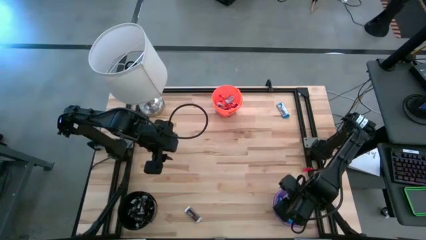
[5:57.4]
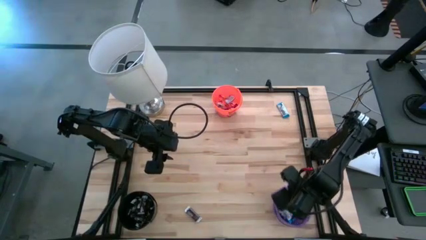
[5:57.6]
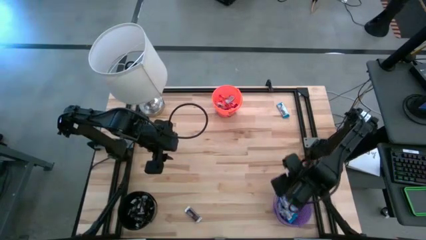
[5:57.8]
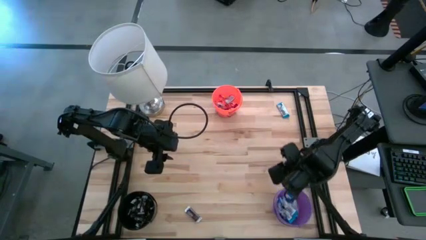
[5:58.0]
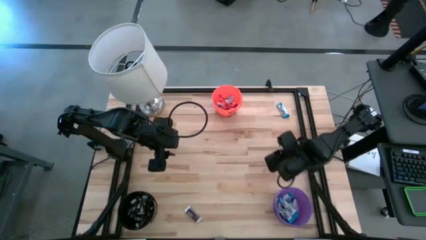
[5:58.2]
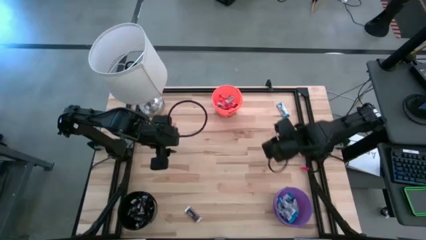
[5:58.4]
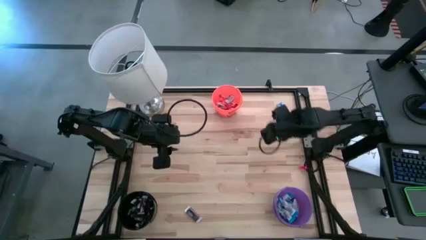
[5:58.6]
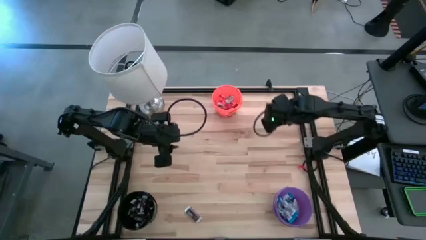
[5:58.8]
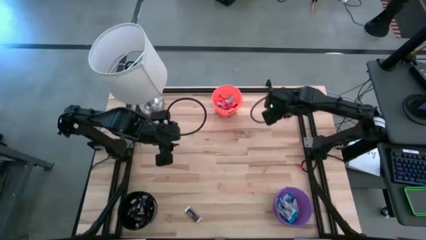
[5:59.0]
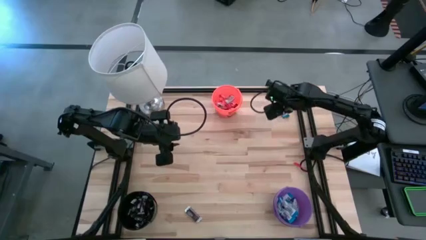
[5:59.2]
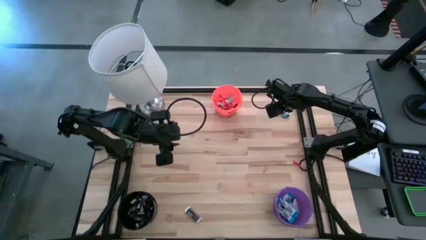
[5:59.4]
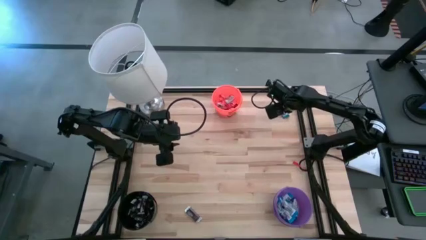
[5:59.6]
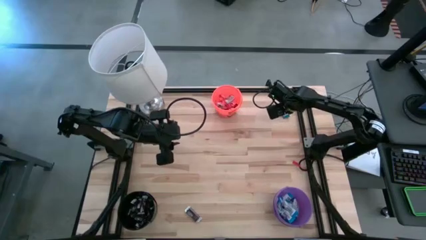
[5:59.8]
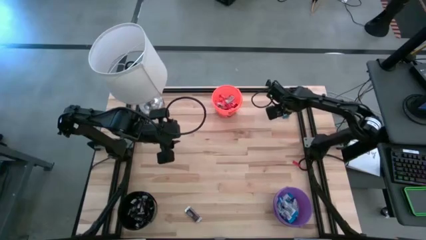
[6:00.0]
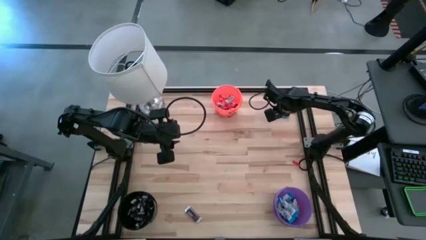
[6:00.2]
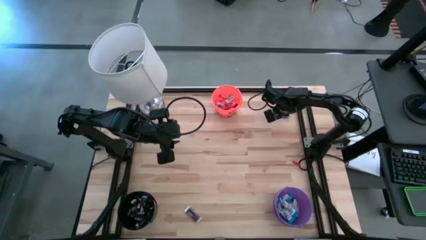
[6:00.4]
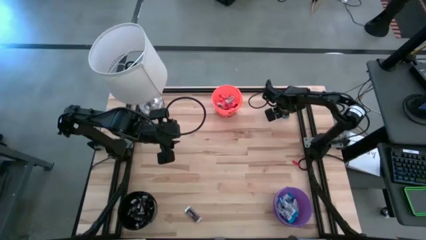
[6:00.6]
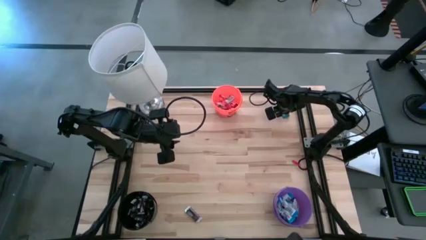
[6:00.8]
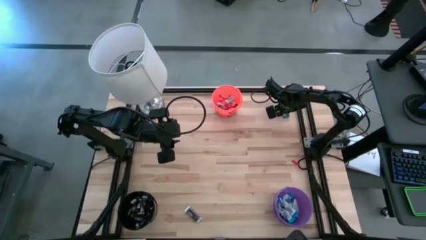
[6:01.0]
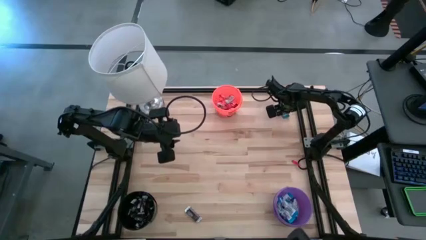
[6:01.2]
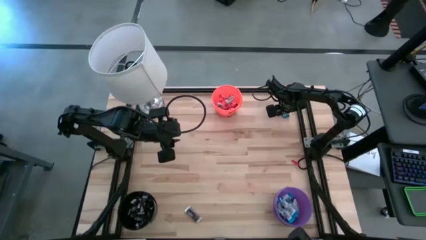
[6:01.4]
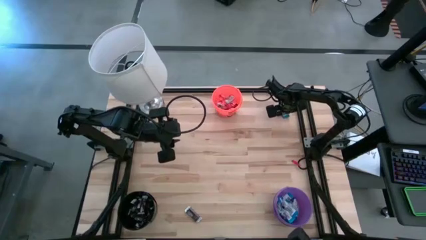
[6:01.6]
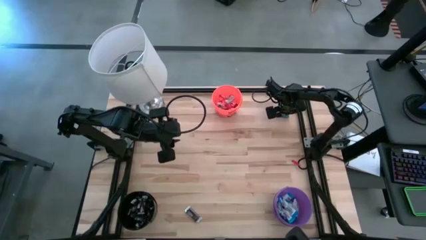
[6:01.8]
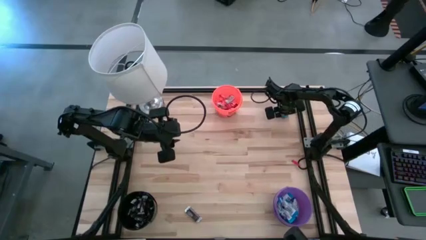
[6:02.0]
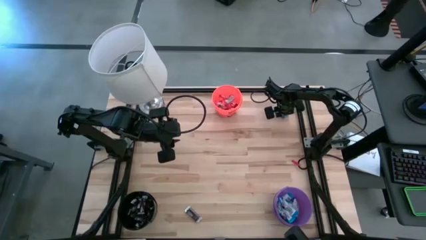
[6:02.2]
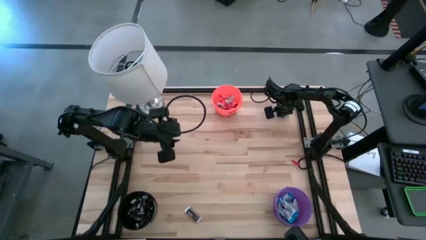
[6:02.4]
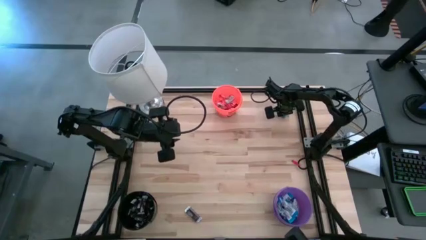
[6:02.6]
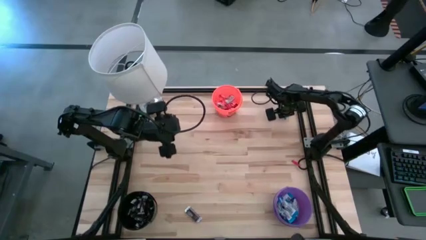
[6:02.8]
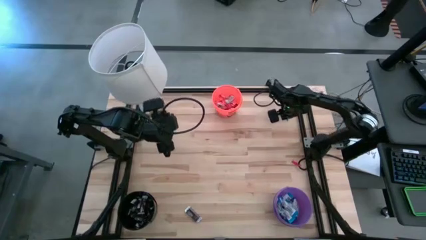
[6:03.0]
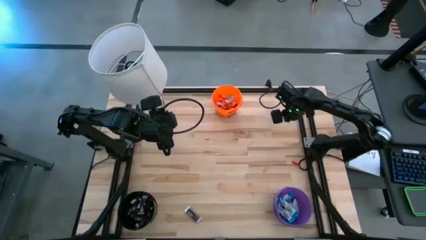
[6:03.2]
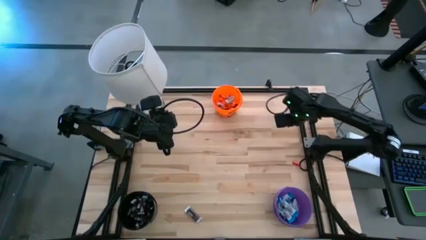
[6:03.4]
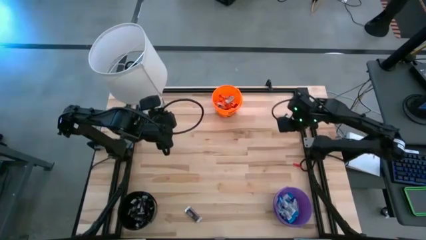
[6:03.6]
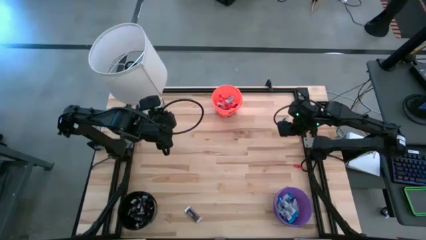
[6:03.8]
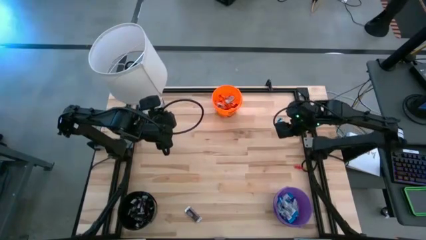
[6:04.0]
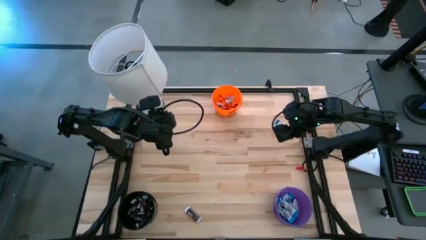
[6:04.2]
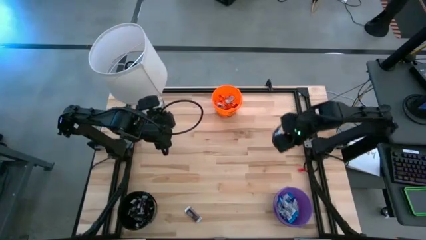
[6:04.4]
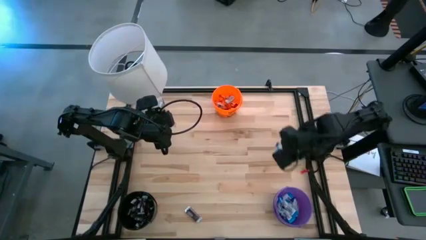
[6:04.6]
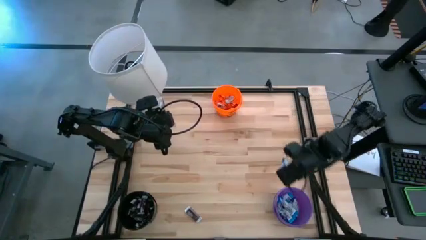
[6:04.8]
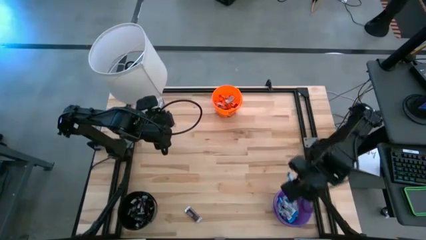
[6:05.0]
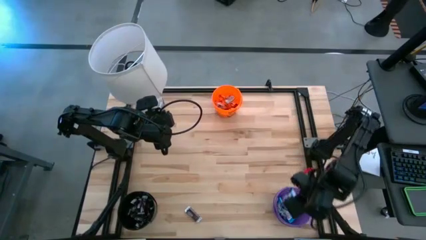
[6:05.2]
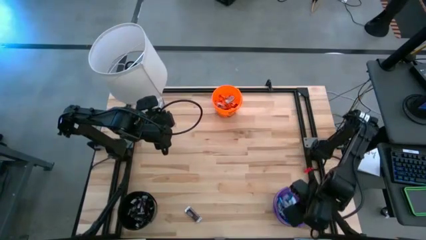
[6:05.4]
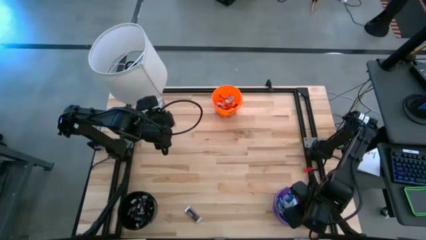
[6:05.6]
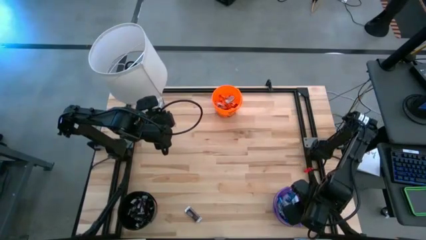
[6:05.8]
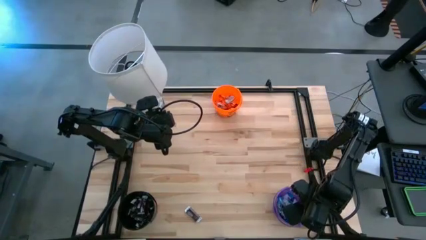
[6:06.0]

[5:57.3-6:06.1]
Task: Organize candy in baskets
Put the white chocolate into the purple bucket

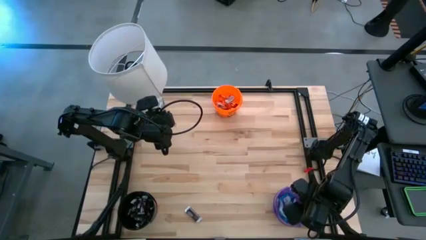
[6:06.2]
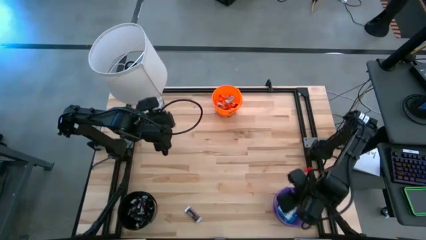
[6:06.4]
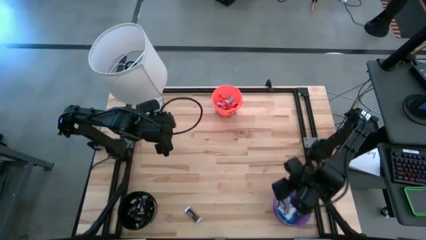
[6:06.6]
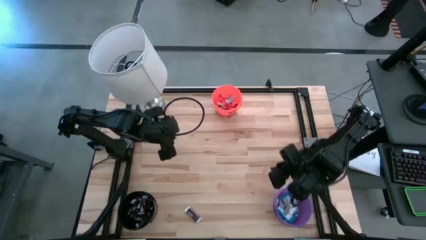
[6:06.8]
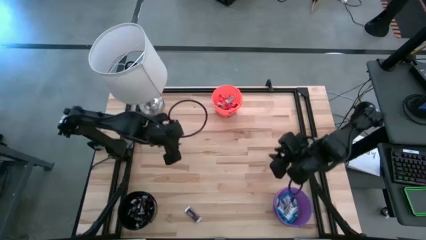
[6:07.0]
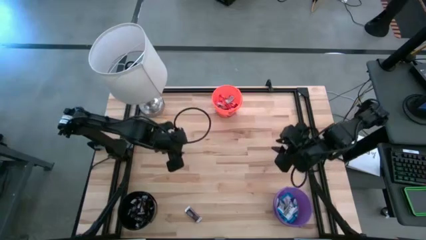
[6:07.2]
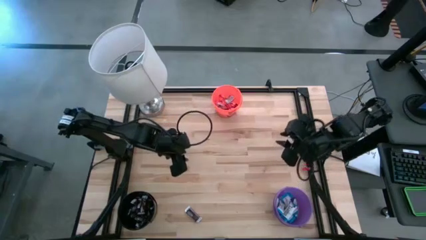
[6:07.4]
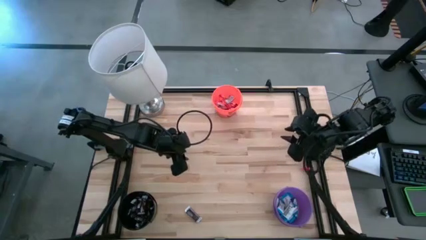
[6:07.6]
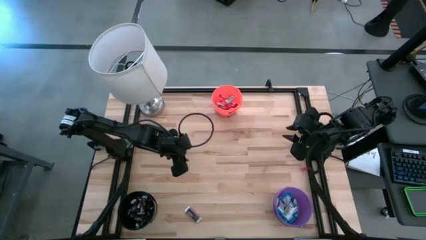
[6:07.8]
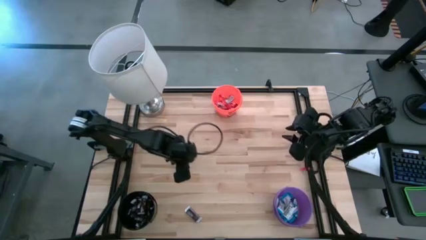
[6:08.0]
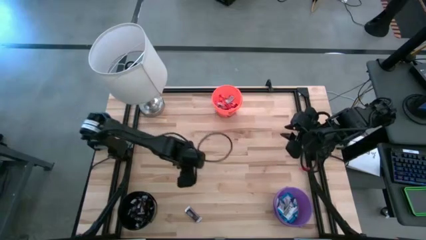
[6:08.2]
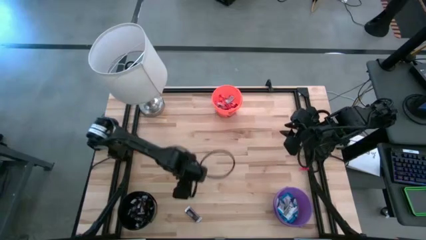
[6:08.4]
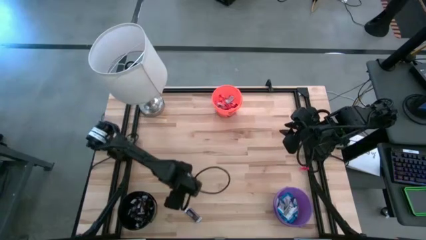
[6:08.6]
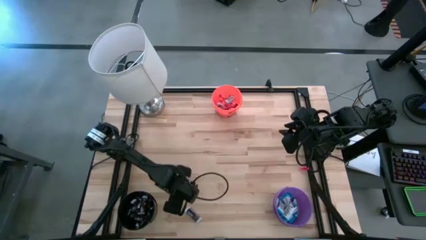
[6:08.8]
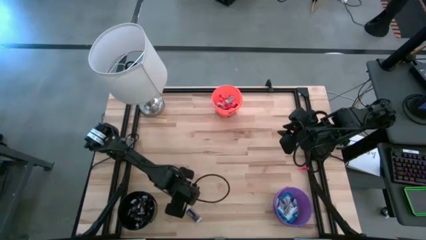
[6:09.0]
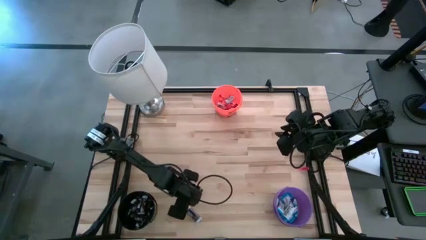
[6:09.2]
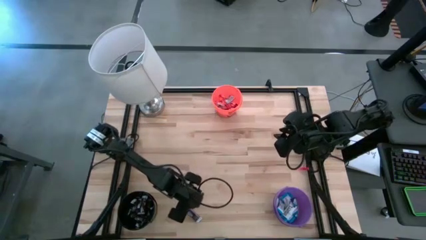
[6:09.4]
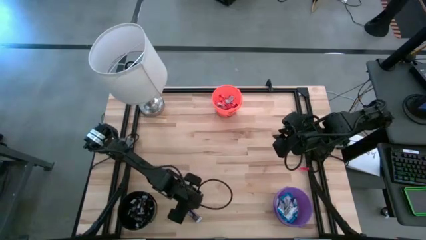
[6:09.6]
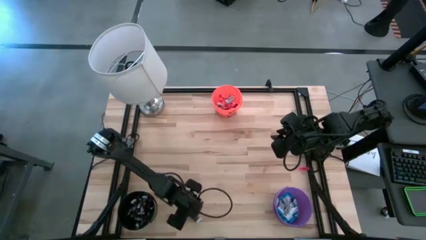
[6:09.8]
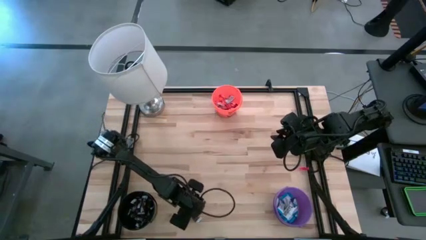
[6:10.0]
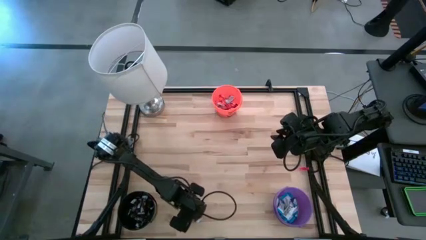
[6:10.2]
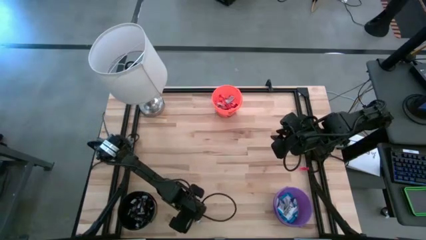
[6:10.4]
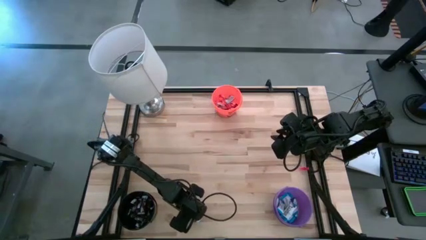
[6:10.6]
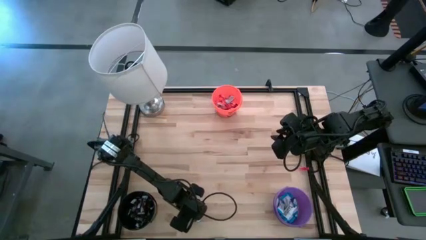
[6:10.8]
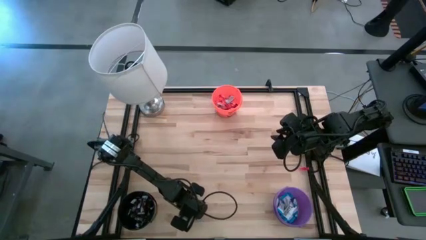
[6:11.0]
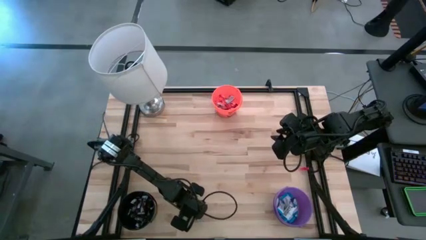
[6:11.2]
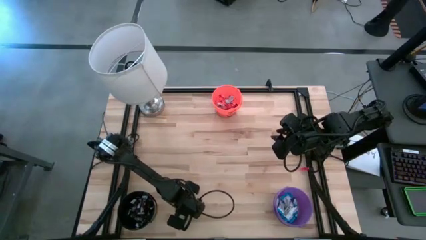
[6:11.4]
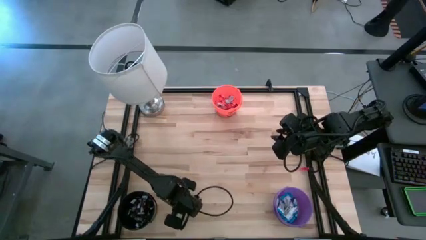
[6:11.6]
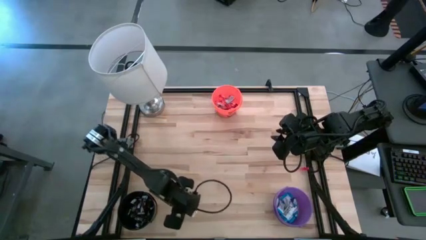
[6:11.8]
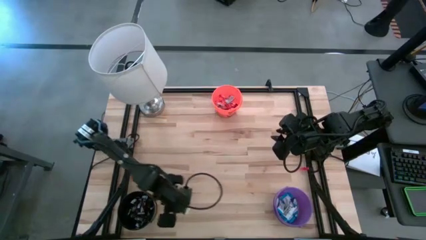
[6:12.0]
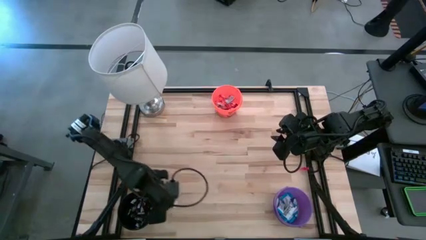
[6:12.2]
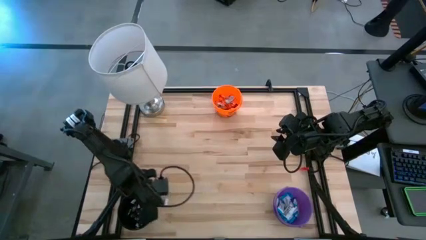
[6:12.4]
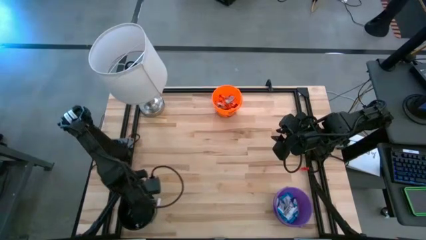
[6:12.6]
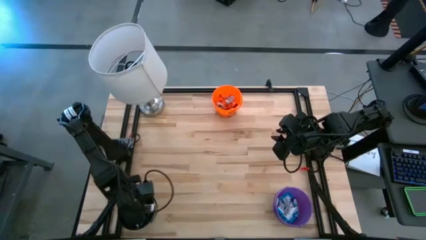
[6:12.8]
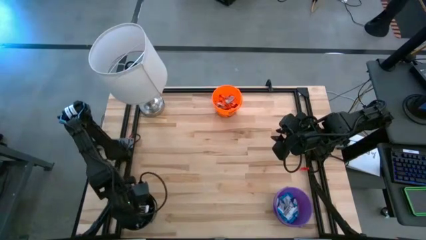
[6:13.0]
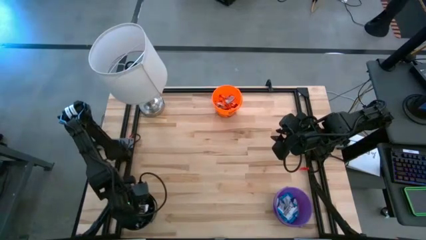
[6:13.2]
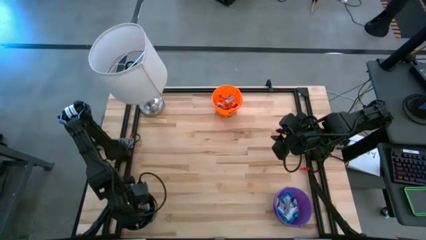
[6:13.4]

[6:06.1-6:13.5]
Put the brown chocolate into the black bucket
